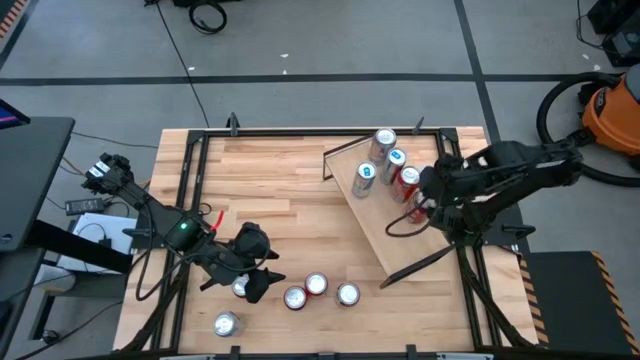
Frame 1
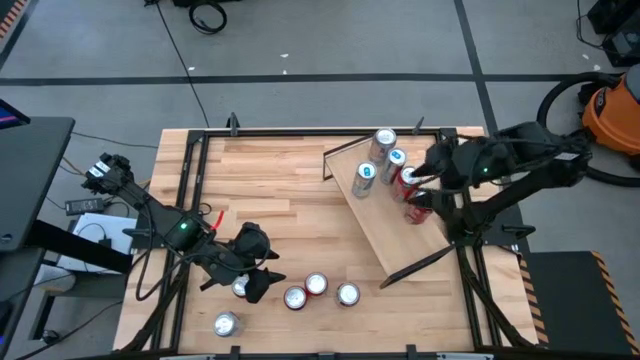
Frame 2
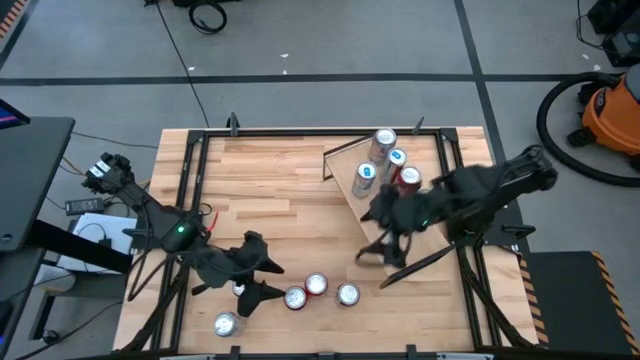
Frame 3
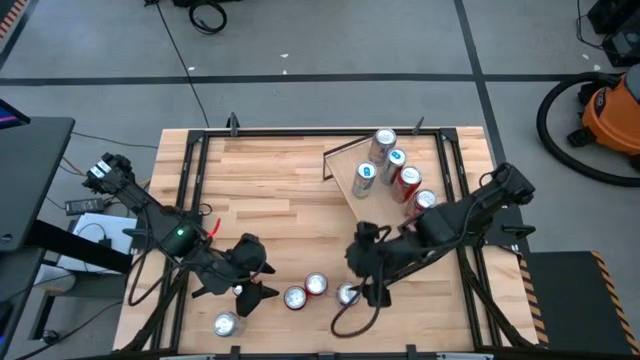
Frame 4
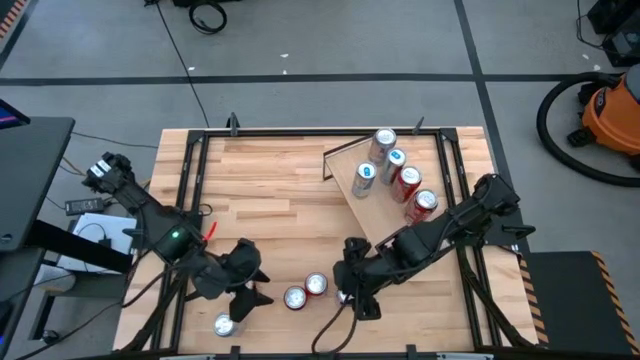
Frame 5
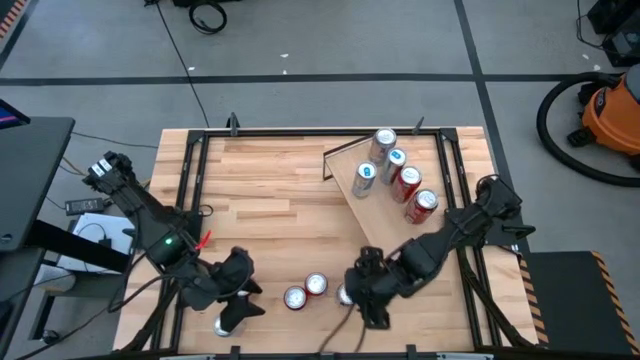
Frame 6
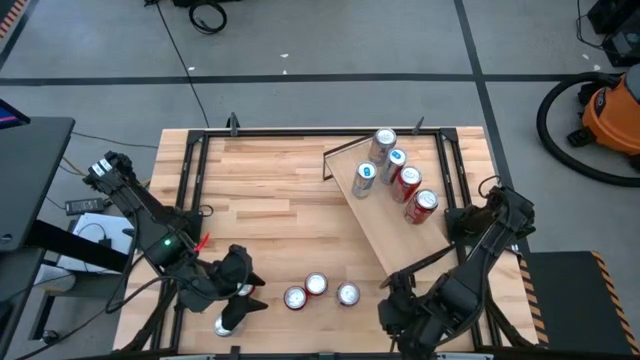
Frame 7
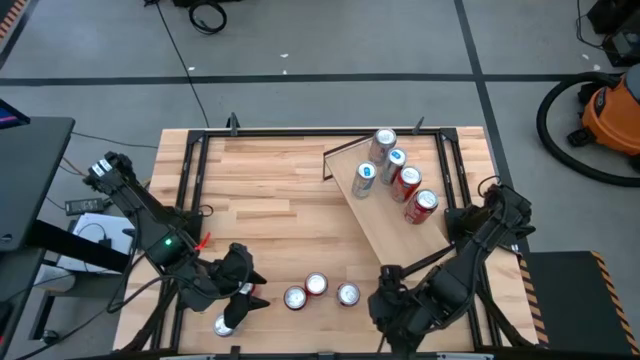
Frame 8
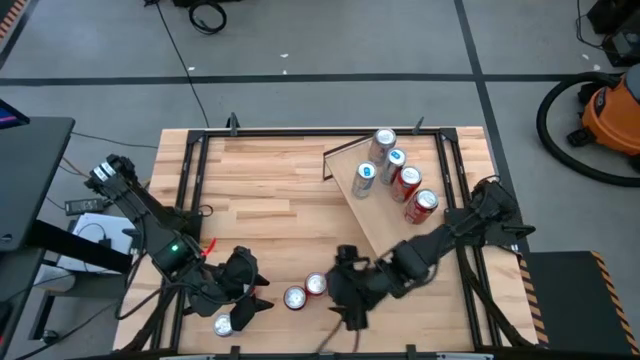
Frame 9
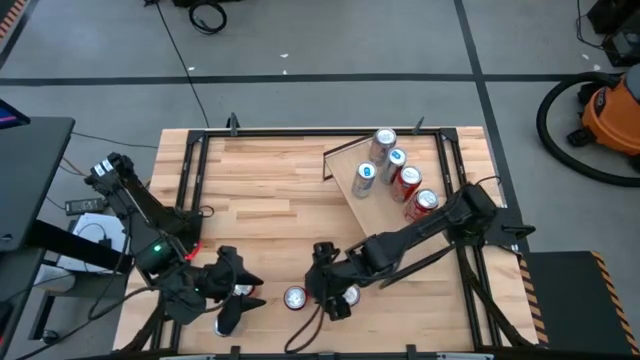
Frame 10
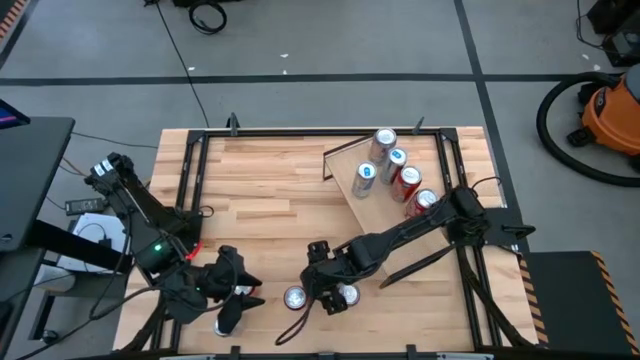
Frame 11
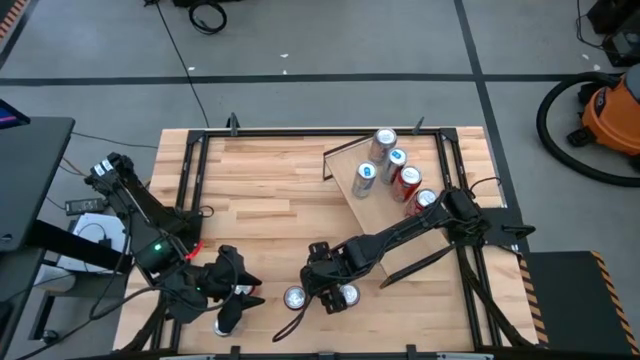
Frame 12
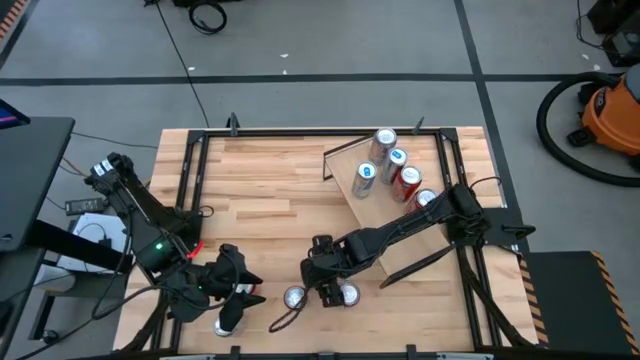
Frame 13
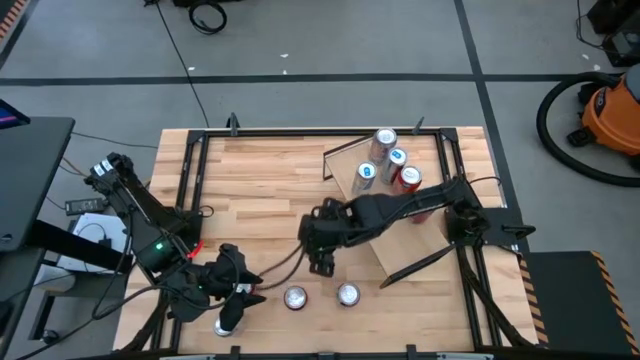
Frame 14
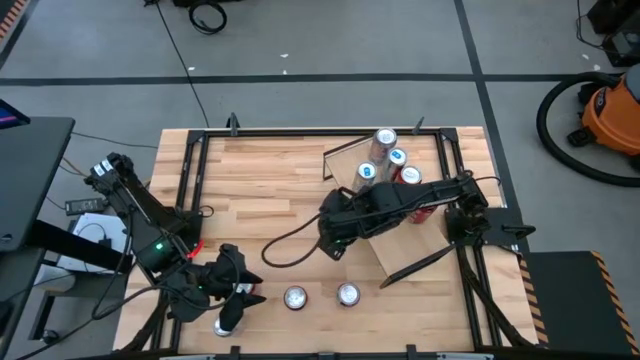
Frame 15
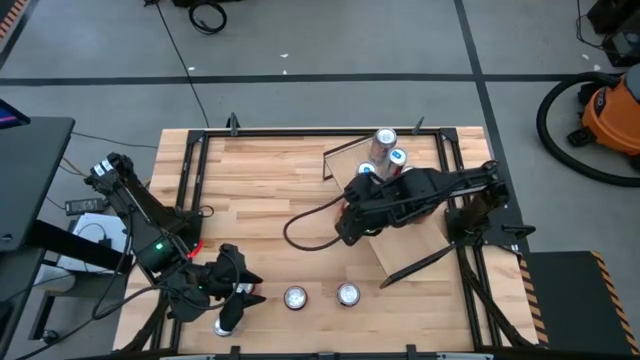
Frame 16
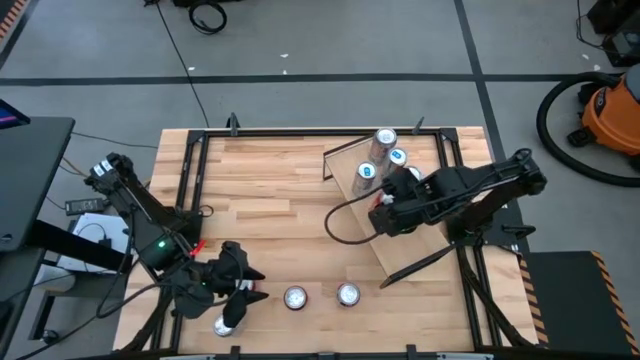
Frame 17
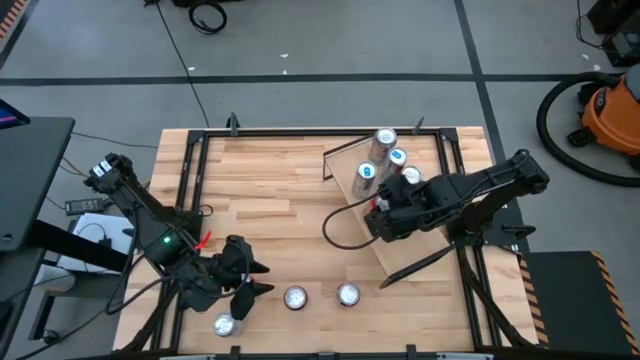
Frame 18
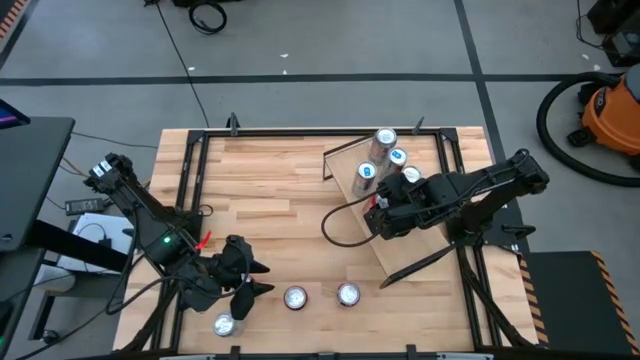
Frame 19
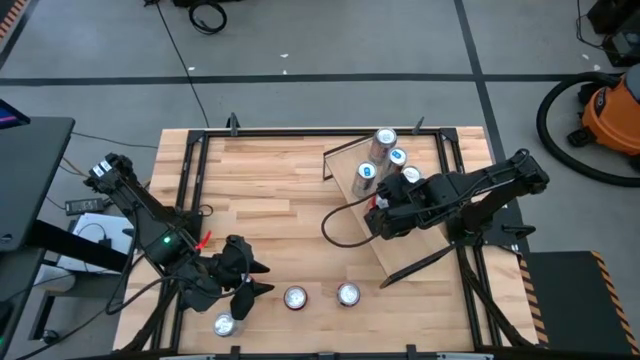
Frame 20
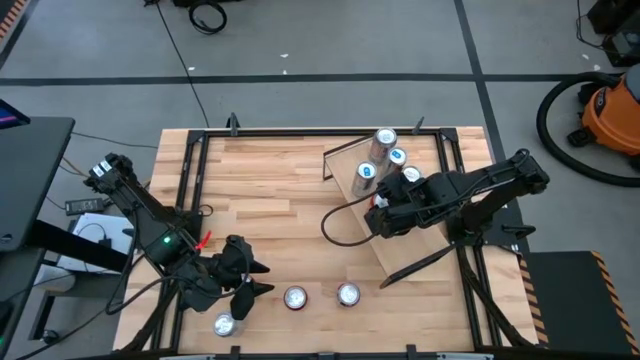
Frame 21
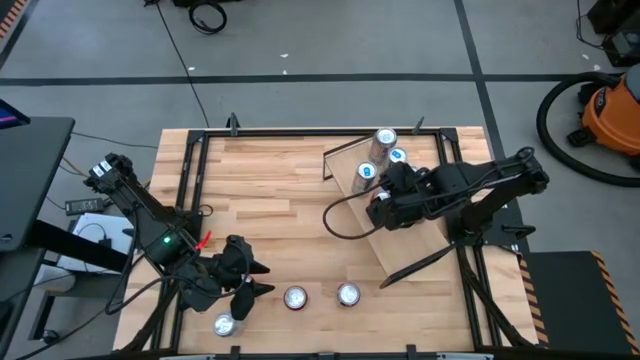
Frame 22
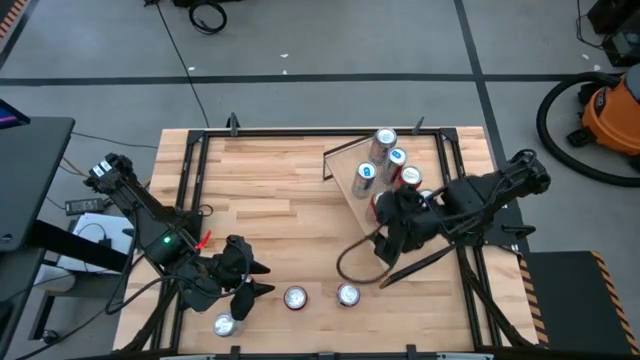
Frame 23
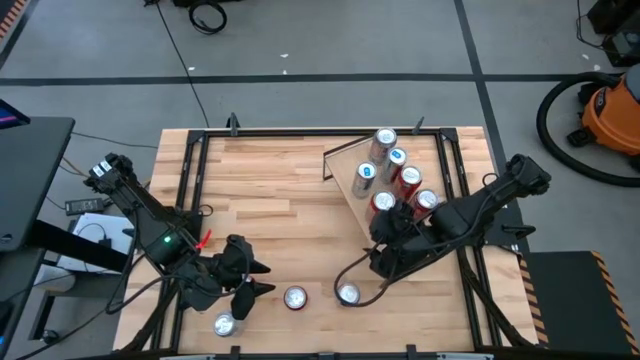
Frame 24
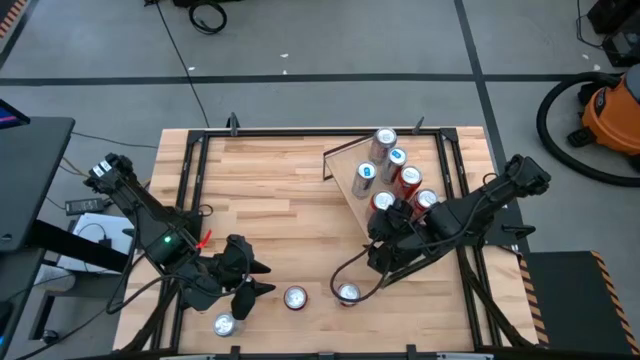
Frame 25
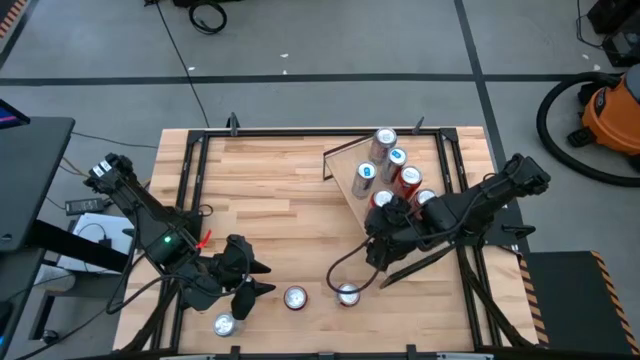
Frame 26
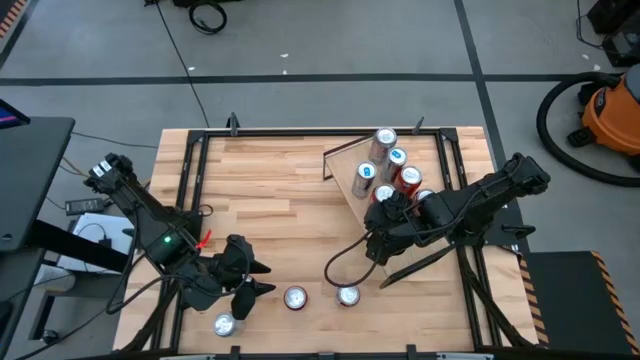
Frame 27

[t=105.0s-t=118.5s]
Task: Place canned beverage on shelf
Put the orange soda can on the shelf aligned with the other soda can

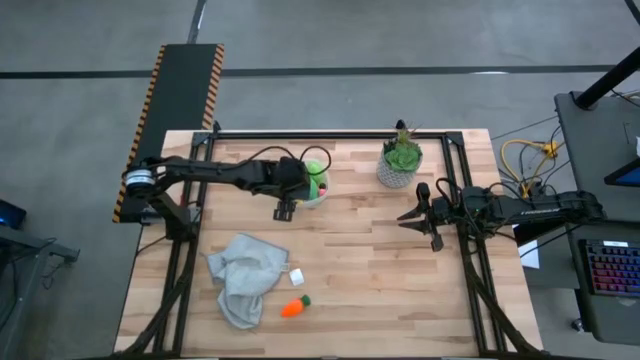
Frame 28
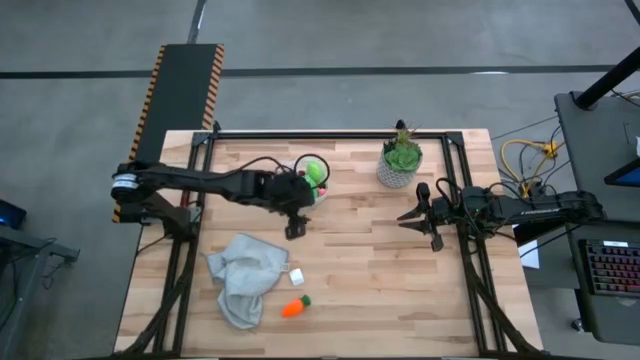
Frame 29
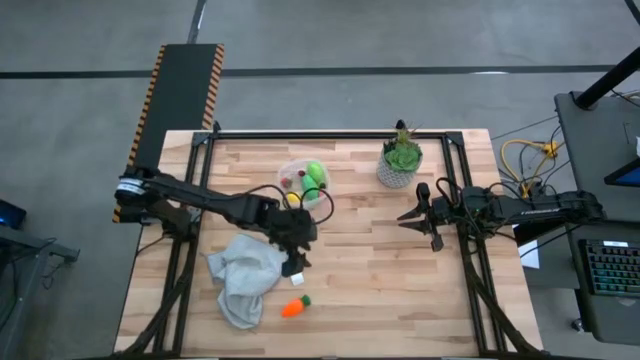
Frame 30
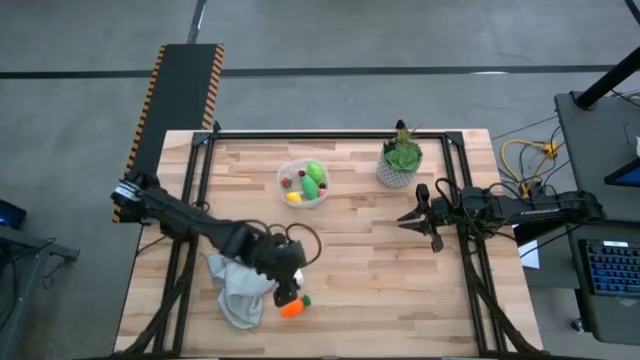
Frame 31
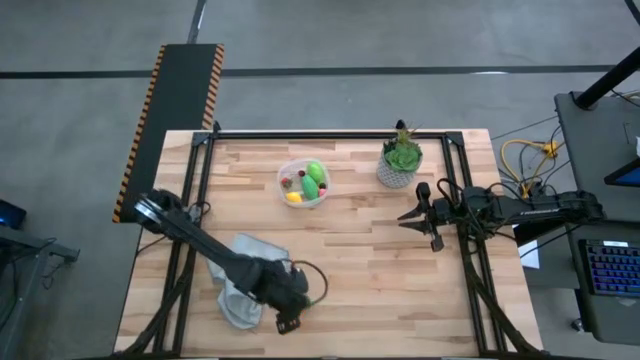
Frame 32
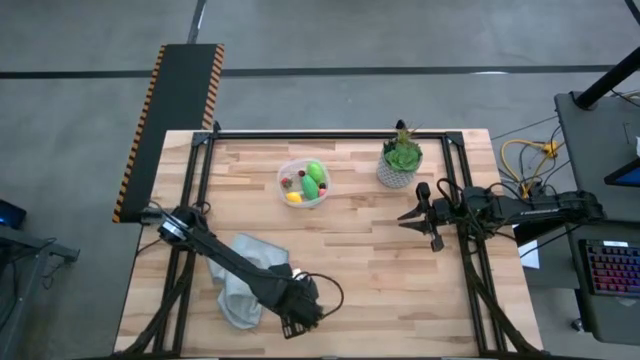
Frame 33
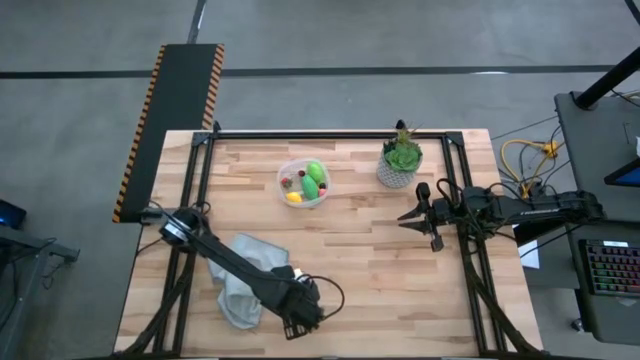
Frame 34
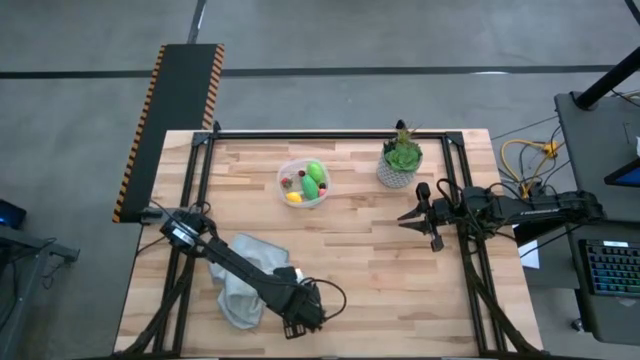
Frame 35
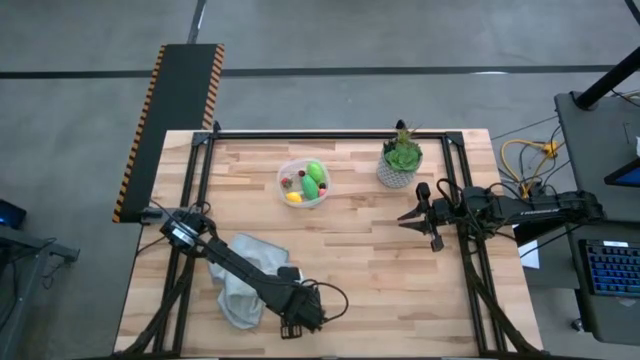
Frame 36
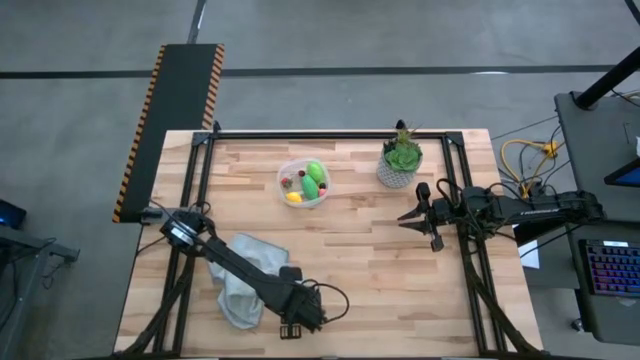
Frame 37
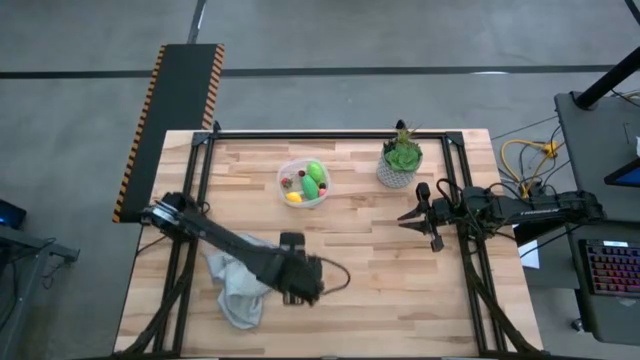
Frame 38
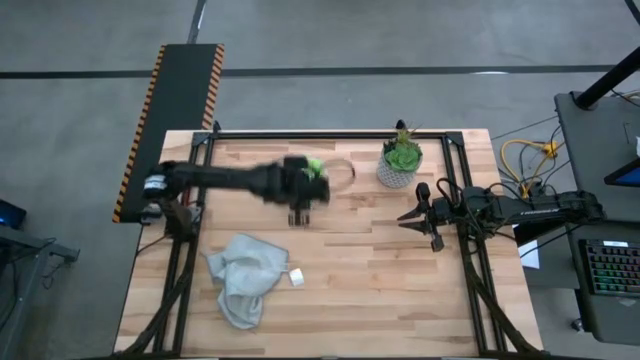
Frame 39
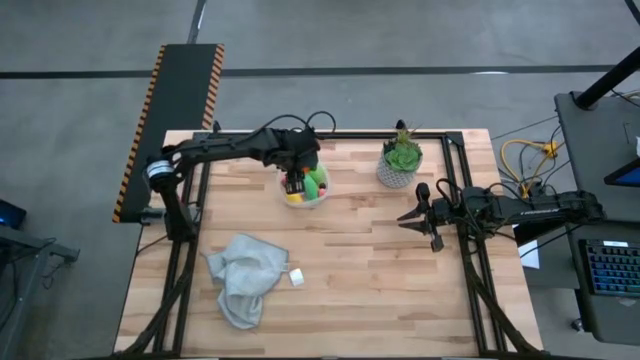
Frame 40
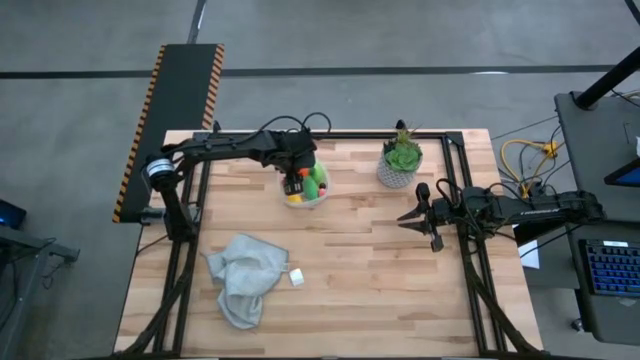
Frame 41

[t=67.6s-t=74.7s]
Task: Pick and placing Produce into tupperware
Put the orange carrot into the transparent bin
